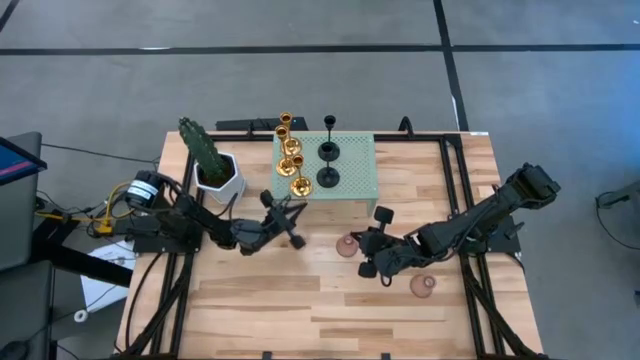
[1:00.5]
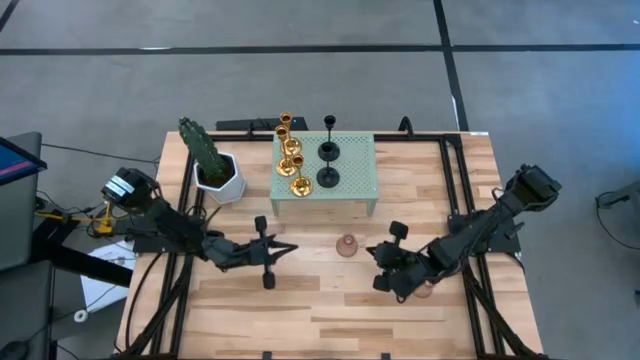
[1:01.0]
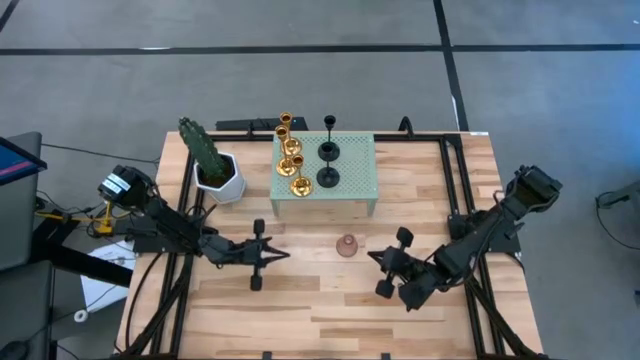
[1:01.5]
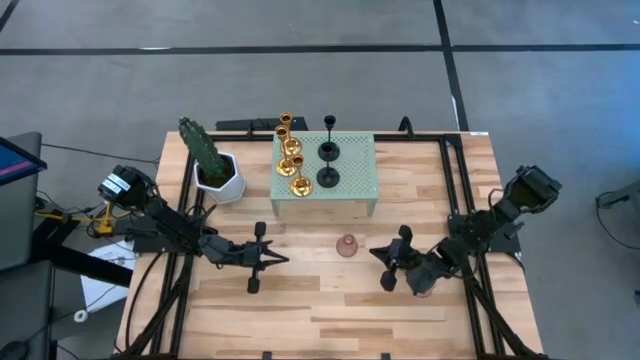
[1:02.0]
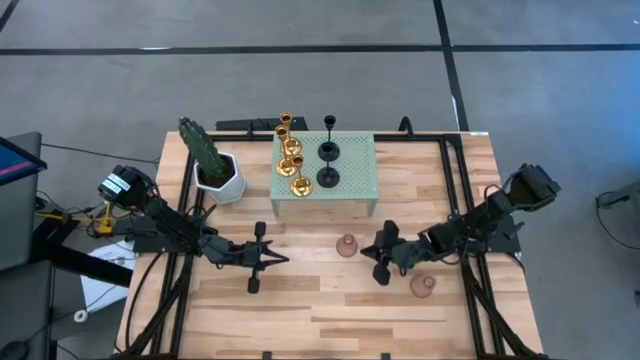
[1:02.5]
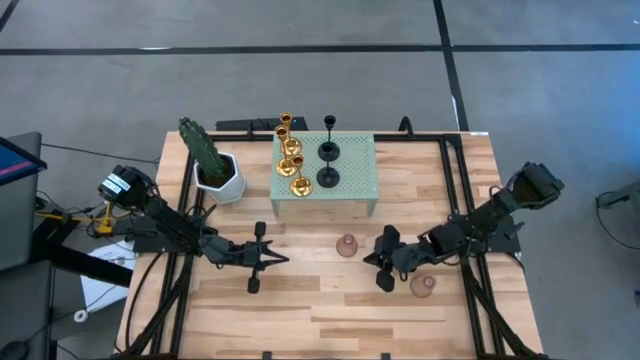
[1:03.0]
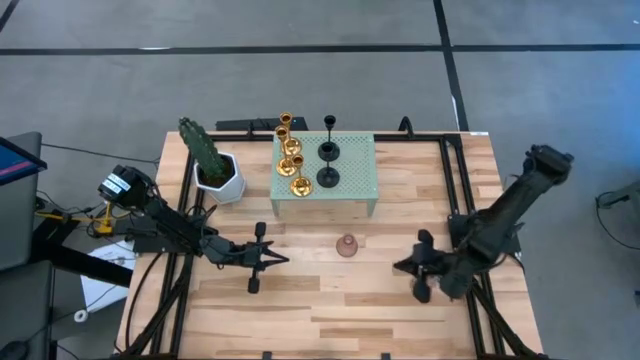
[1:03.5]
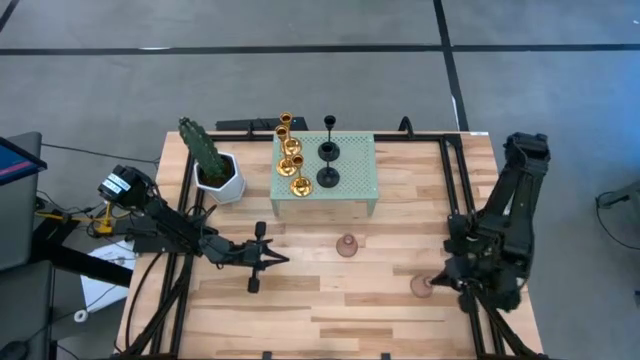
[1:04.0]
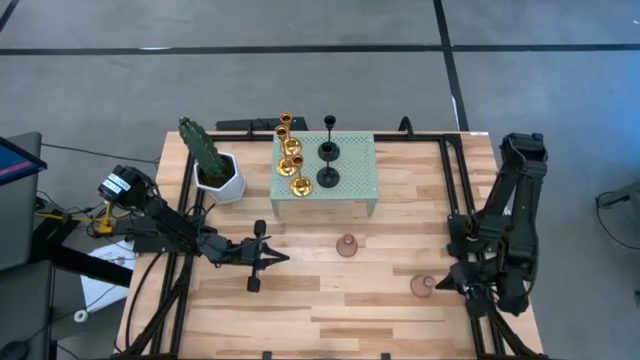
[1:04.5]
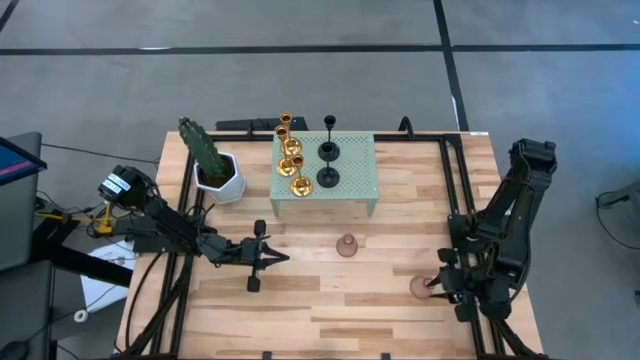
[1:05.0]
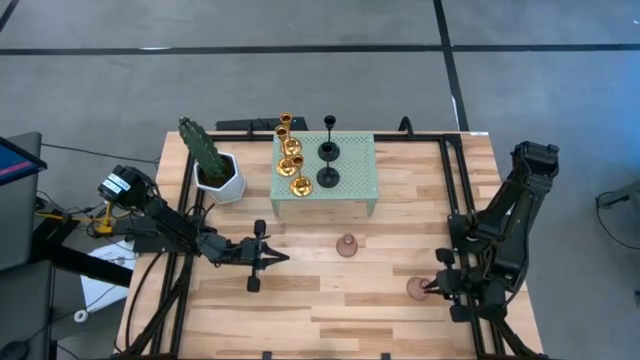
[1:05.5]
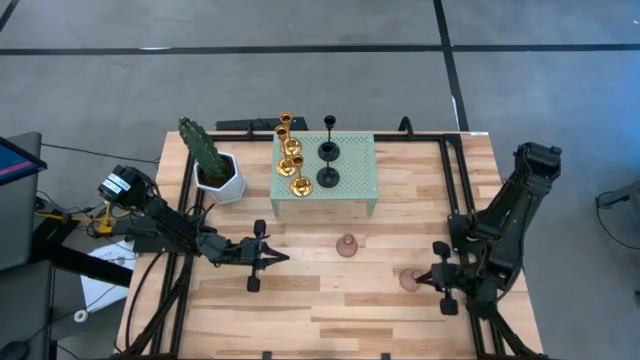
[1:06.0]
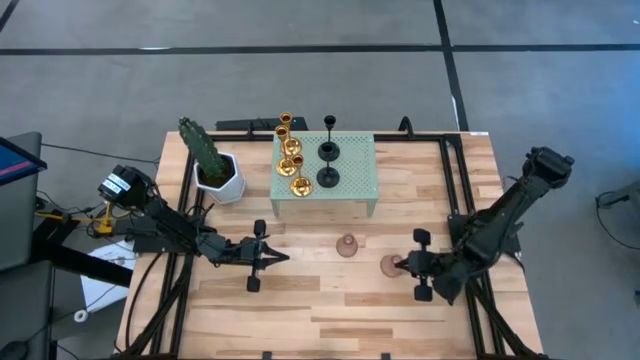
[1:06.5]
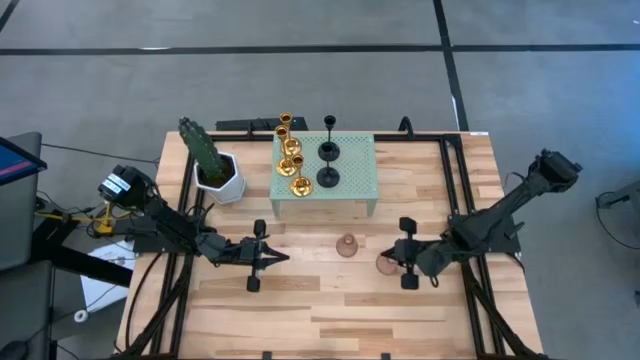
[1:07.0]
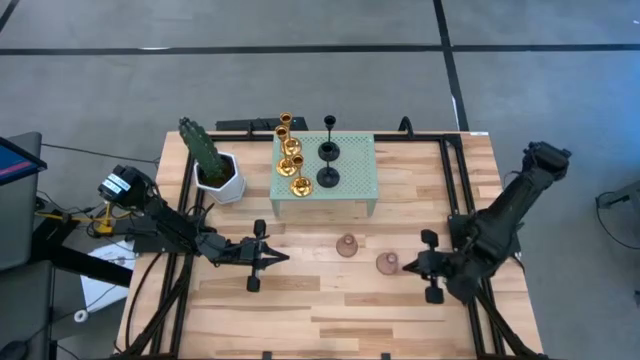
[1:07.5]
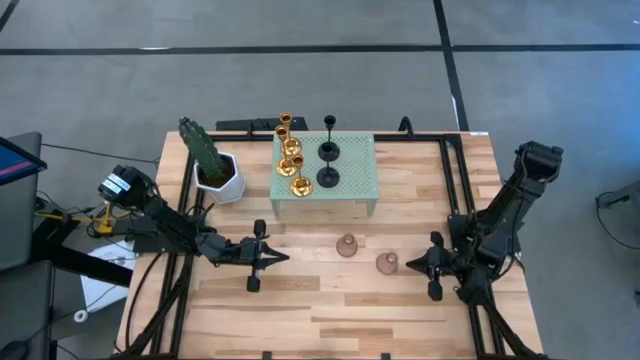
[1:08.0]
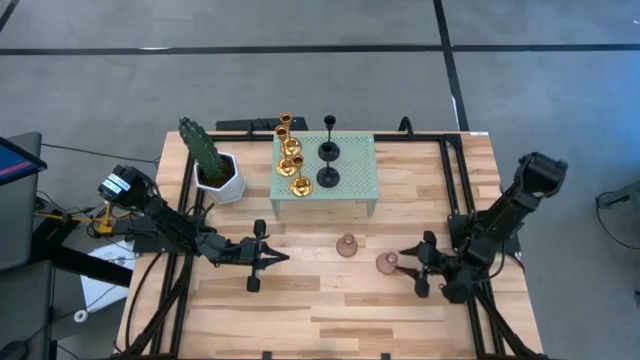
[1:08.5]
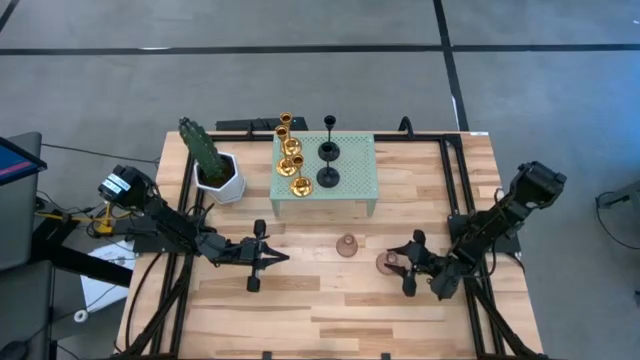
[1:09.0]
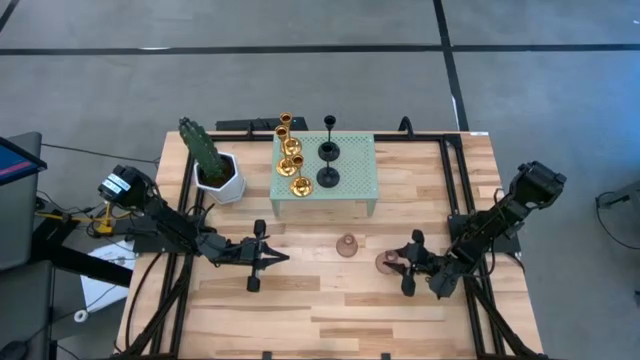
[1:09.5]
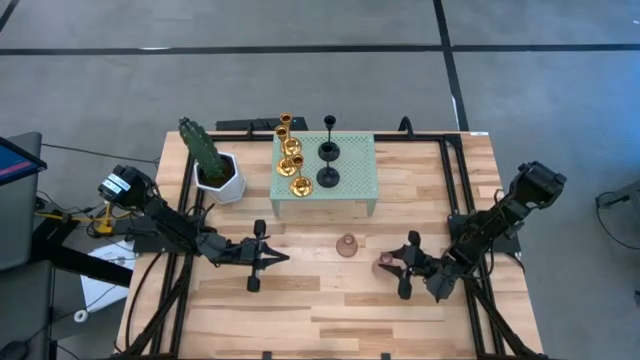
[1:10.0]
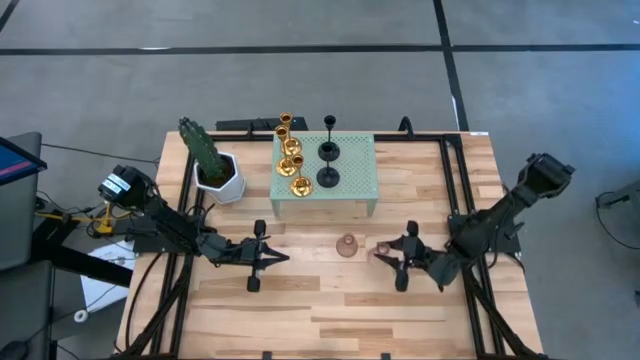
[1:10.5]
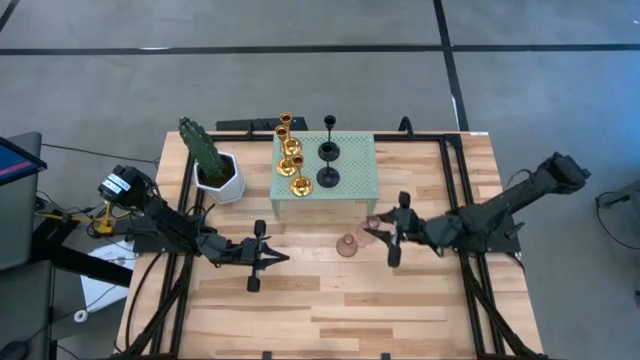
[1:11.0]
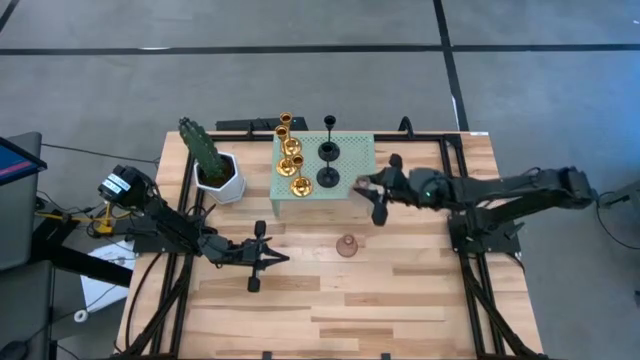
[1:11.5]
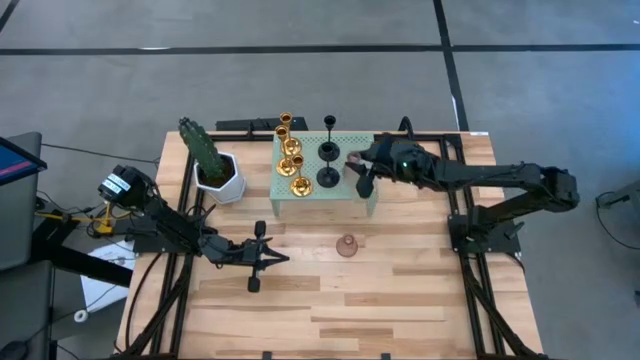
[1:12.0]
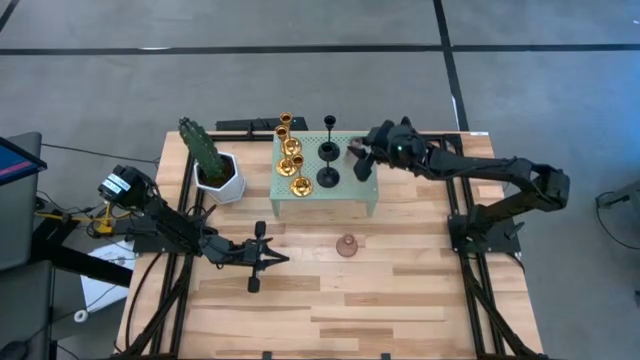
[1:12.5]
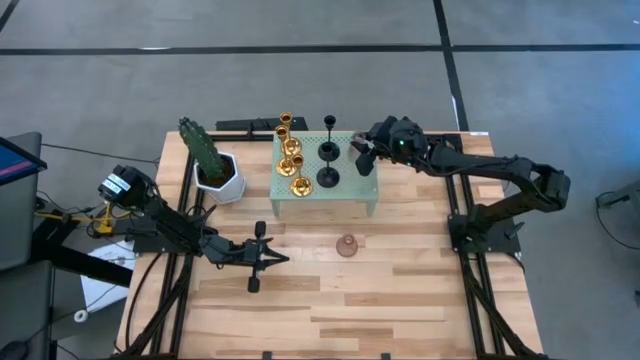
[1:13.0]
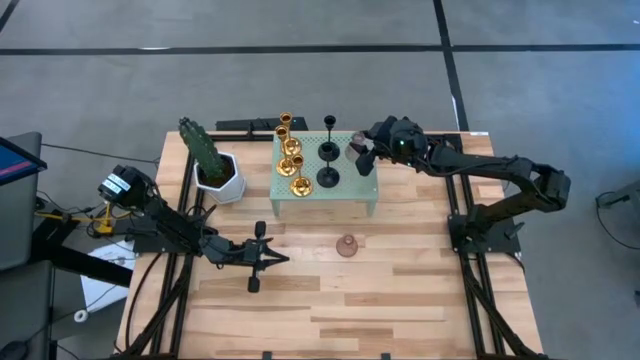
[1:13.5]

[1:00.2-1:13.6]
Task: Pick & Place candle stick holders
Put the right violet candle holder on the shelf

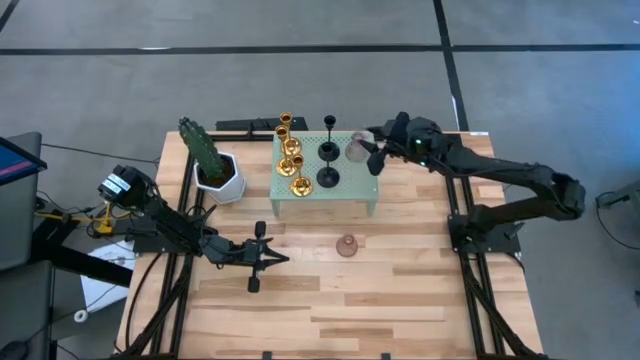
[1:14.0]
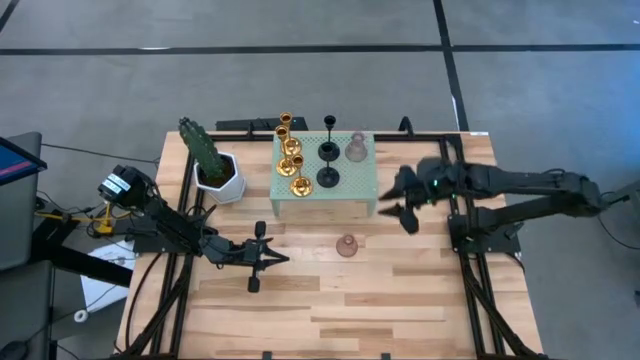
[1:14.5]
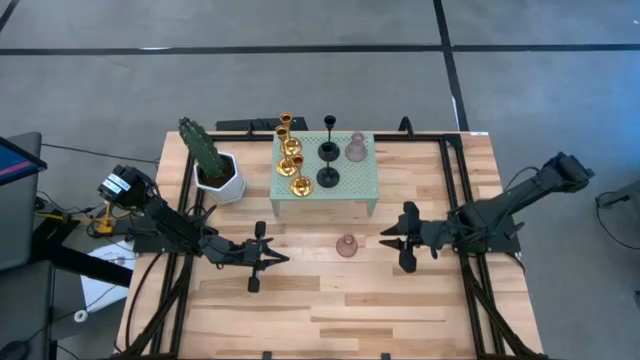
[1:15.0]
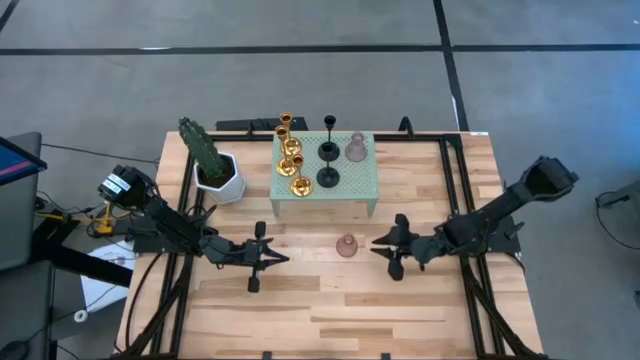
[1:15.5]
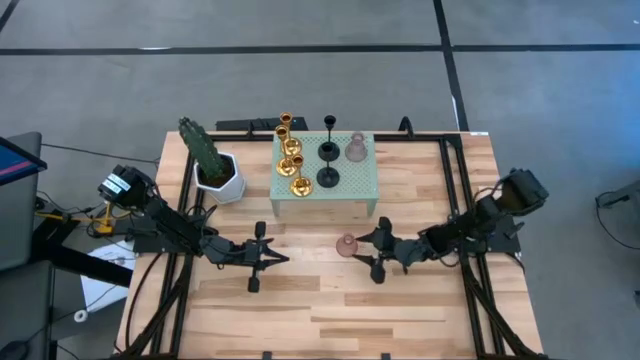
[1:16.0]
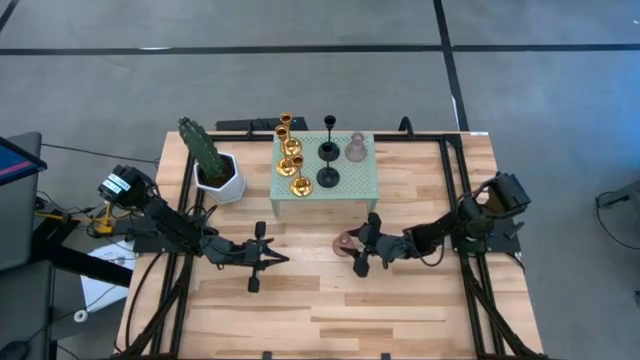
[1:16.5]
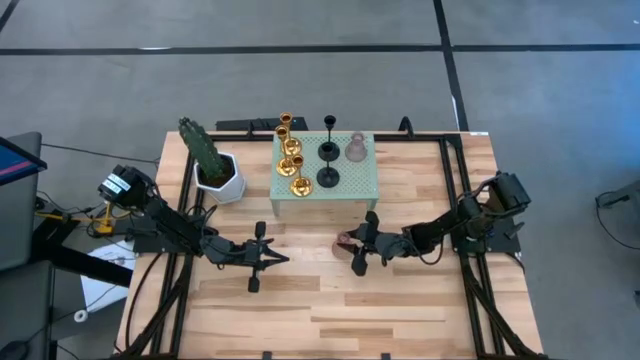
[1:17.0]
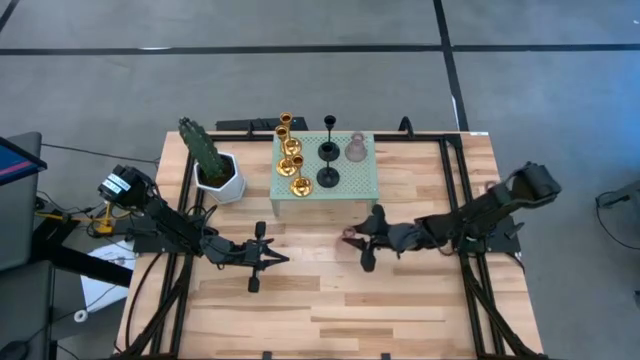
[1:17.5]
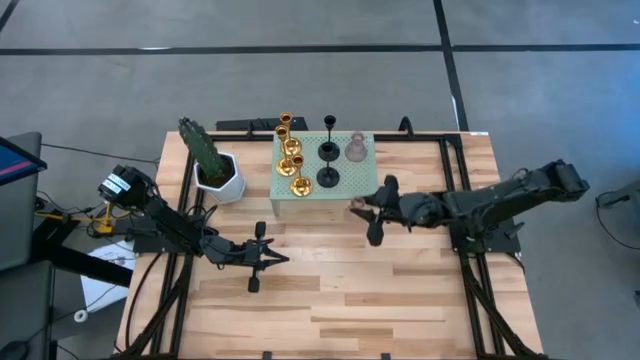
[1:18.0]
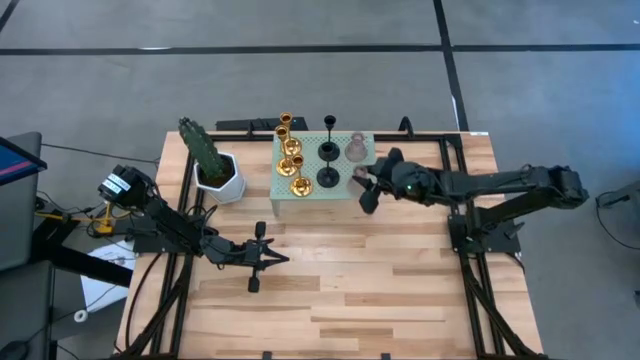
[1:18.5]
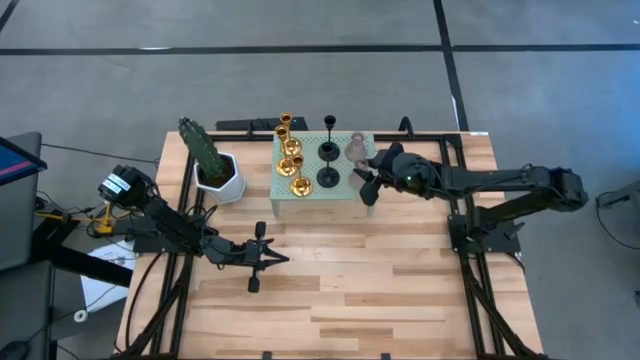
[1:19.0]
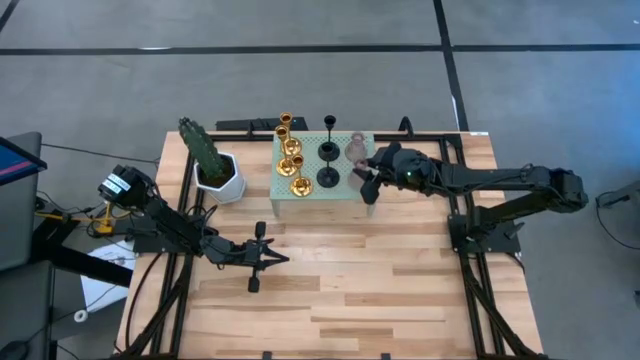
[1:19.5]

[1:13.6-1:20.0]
Put the violet candle holder on the shelf
